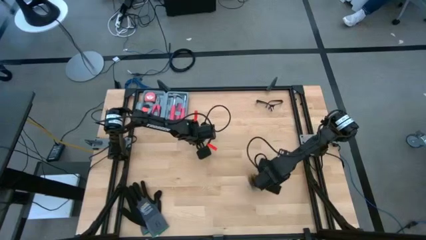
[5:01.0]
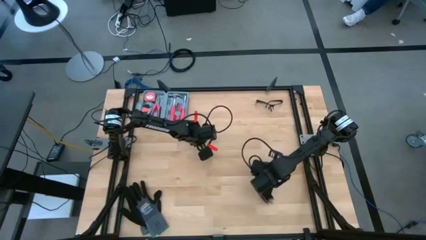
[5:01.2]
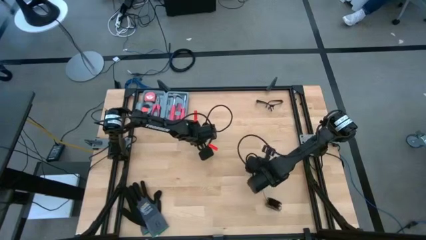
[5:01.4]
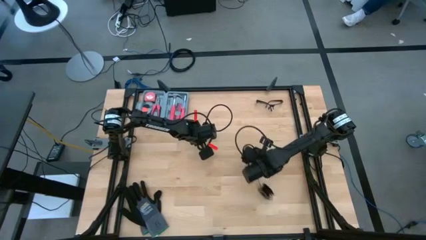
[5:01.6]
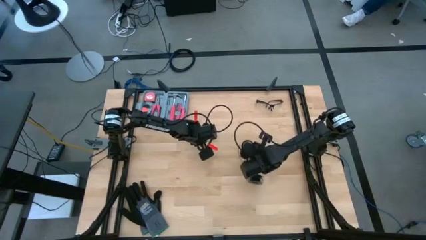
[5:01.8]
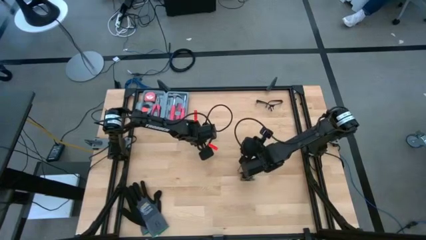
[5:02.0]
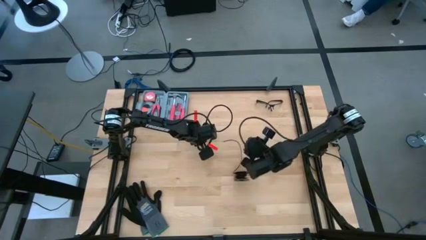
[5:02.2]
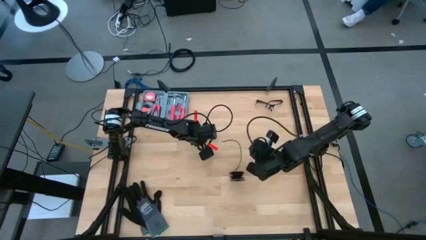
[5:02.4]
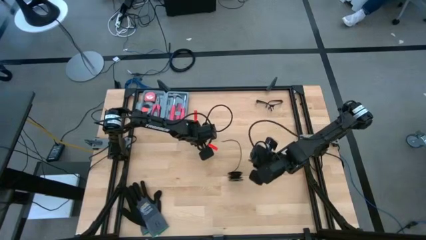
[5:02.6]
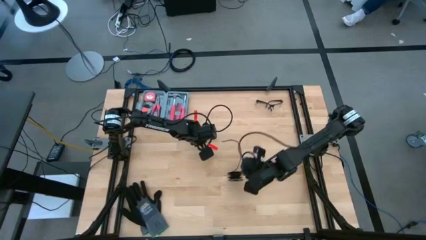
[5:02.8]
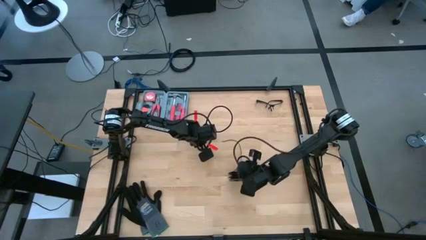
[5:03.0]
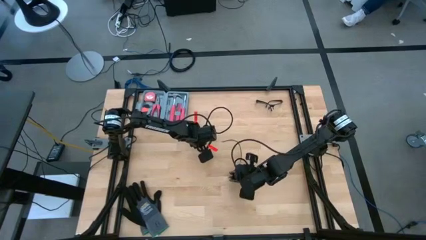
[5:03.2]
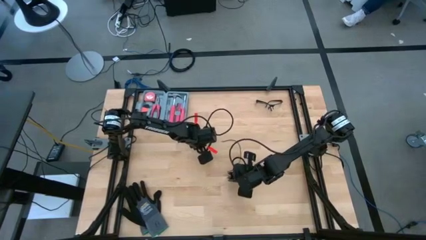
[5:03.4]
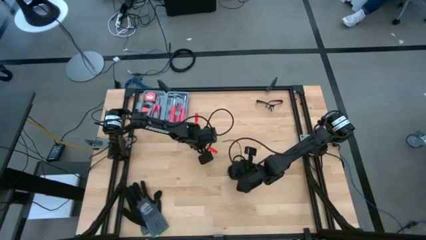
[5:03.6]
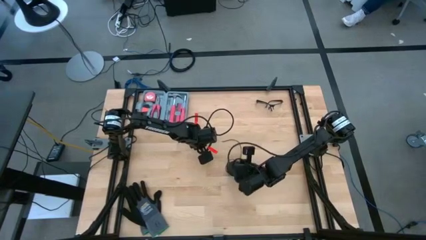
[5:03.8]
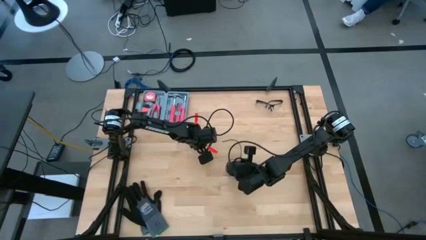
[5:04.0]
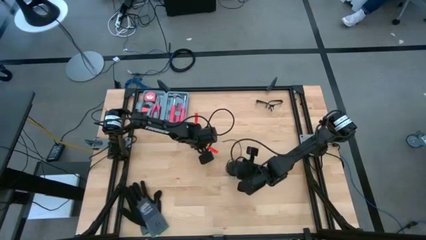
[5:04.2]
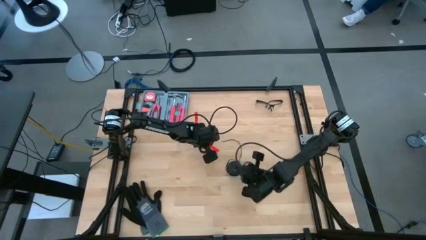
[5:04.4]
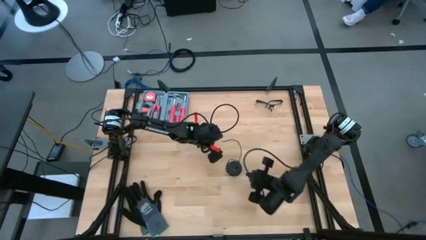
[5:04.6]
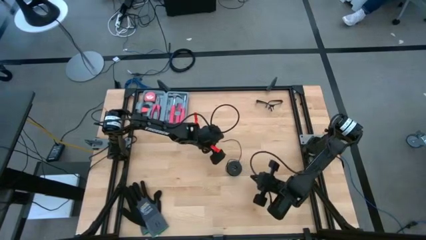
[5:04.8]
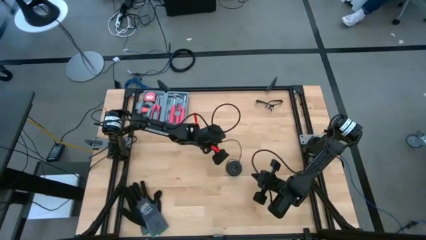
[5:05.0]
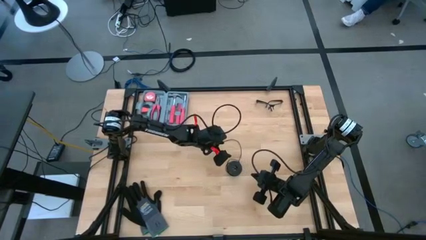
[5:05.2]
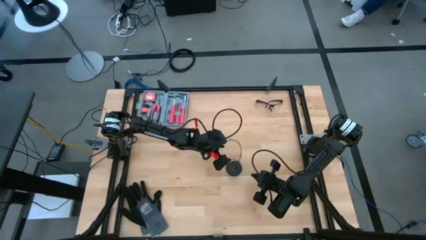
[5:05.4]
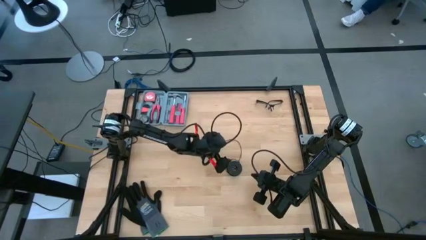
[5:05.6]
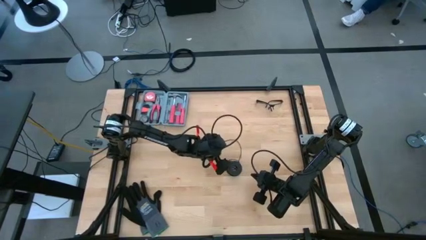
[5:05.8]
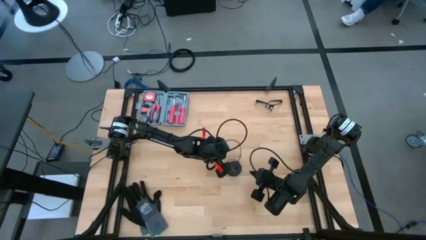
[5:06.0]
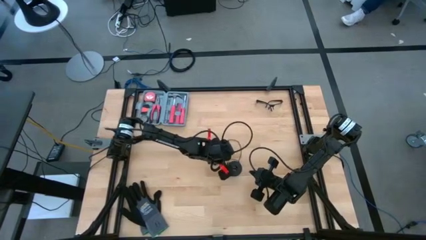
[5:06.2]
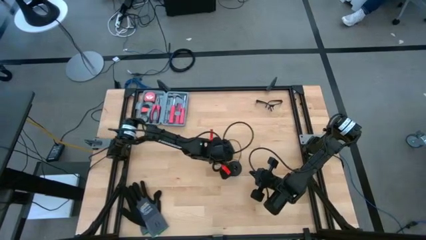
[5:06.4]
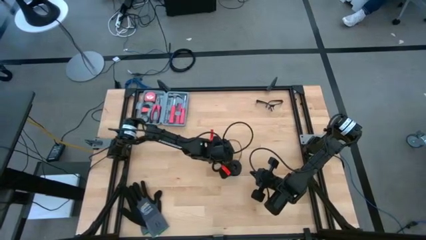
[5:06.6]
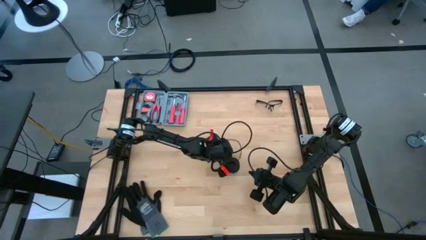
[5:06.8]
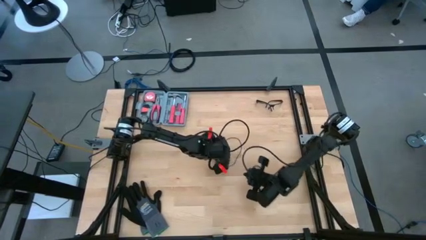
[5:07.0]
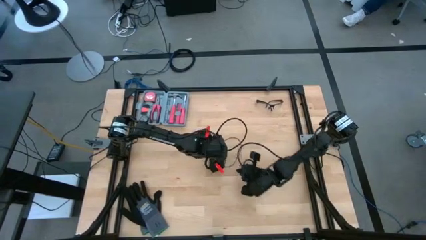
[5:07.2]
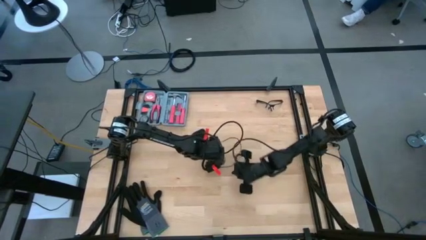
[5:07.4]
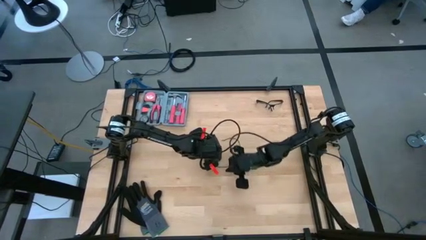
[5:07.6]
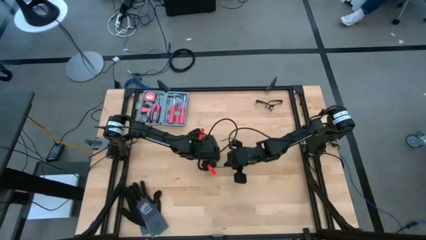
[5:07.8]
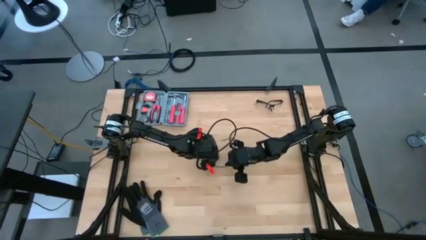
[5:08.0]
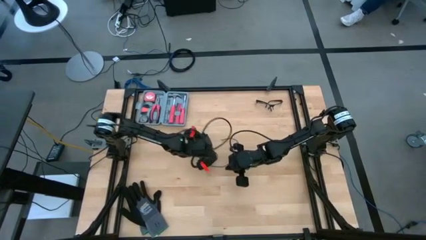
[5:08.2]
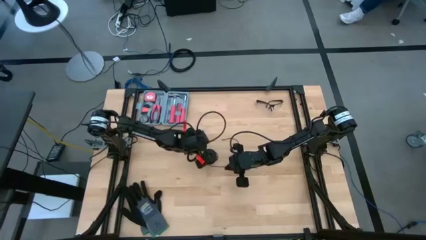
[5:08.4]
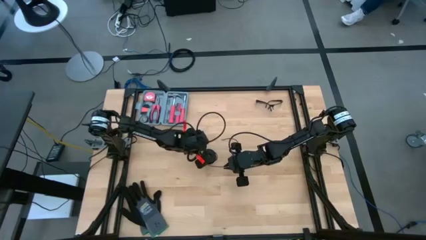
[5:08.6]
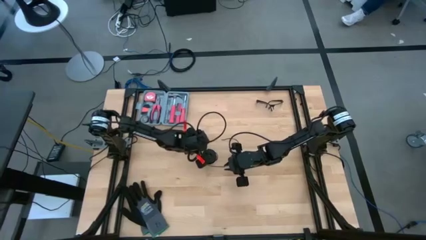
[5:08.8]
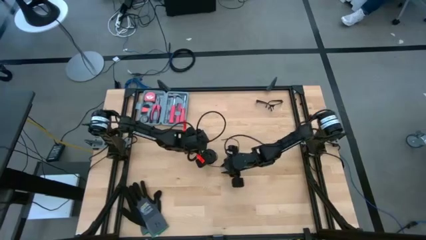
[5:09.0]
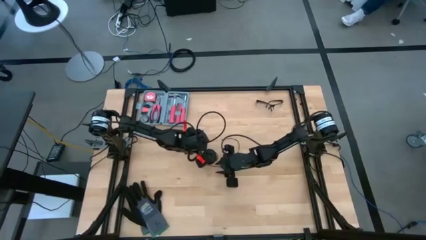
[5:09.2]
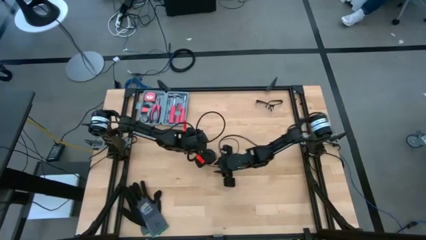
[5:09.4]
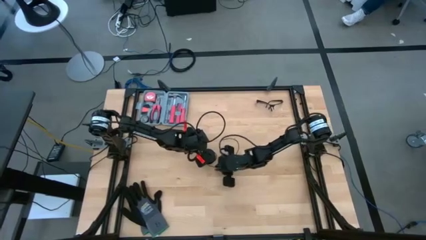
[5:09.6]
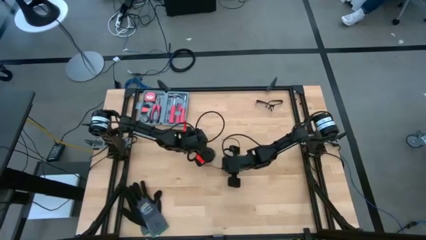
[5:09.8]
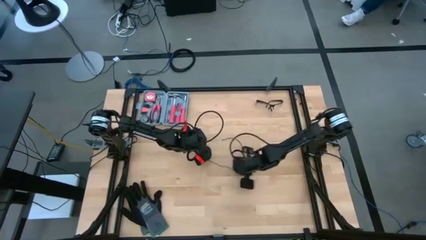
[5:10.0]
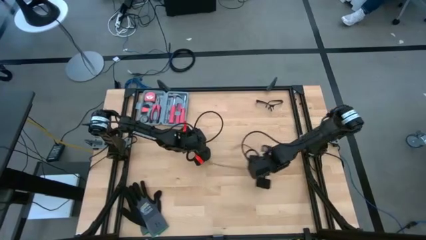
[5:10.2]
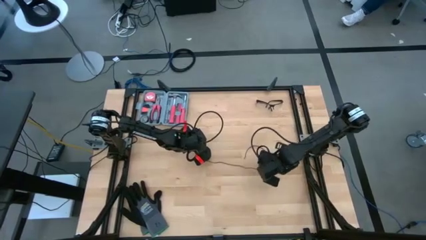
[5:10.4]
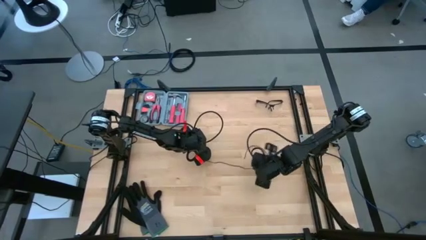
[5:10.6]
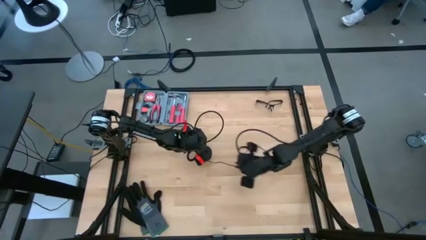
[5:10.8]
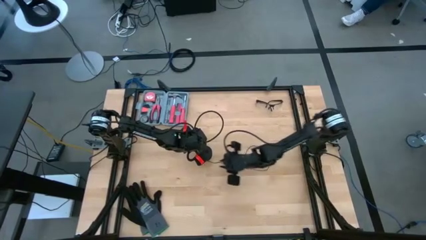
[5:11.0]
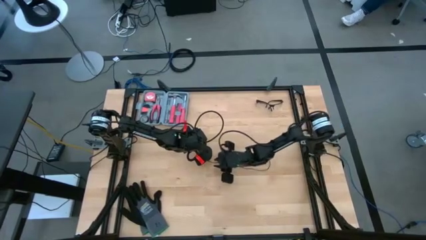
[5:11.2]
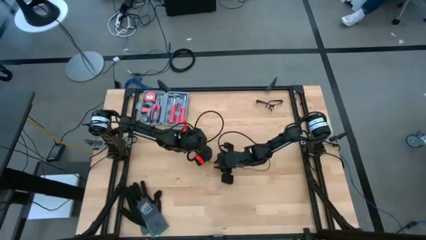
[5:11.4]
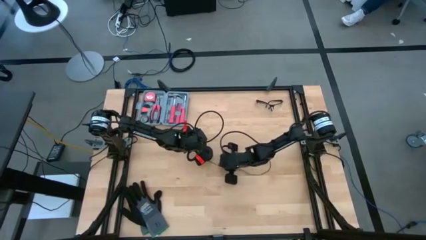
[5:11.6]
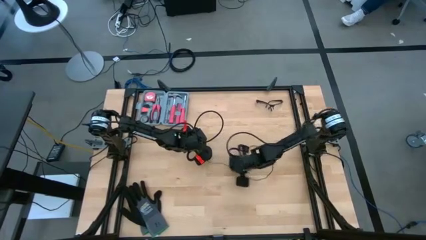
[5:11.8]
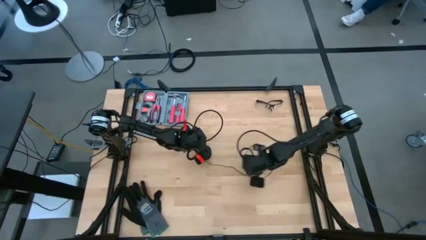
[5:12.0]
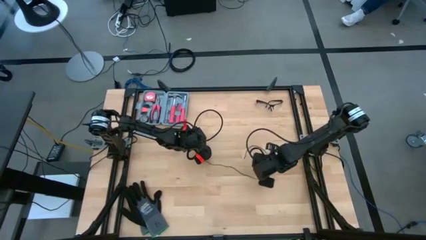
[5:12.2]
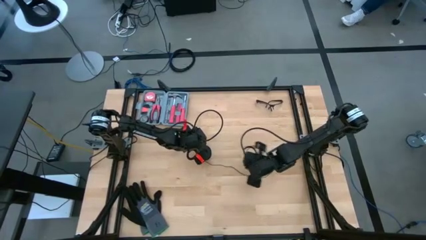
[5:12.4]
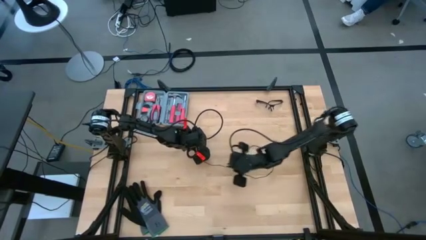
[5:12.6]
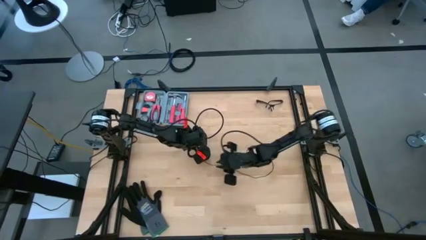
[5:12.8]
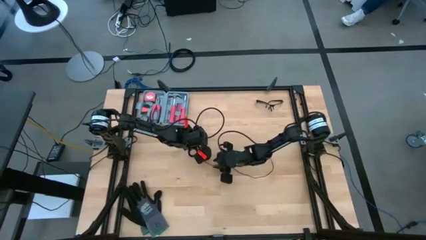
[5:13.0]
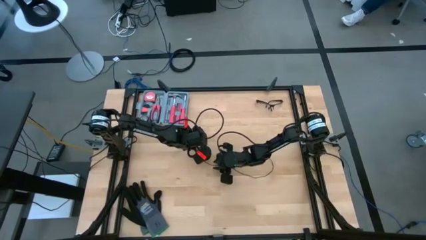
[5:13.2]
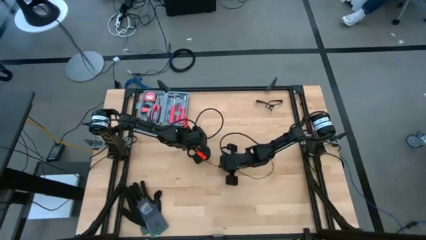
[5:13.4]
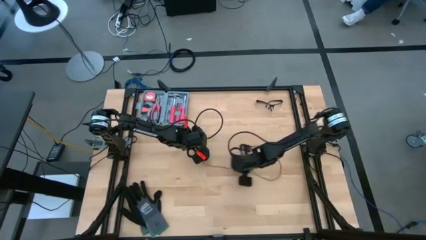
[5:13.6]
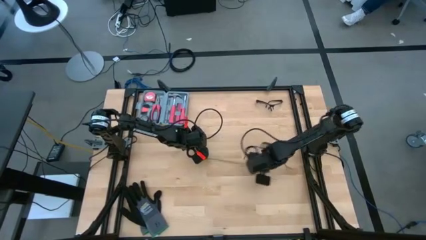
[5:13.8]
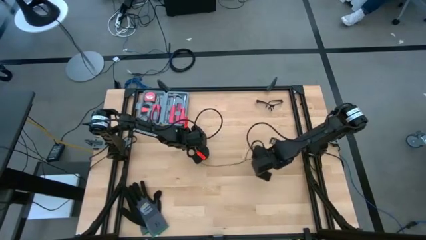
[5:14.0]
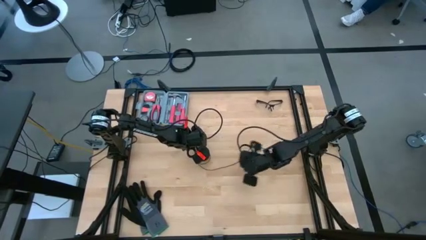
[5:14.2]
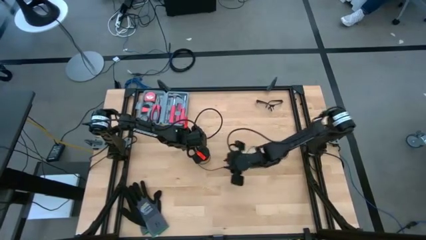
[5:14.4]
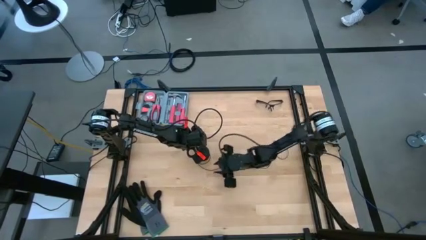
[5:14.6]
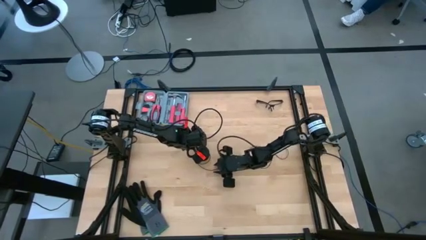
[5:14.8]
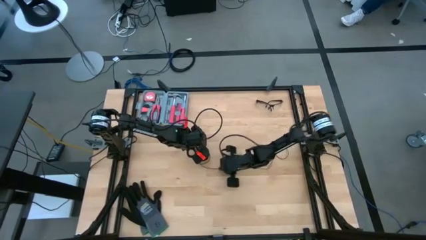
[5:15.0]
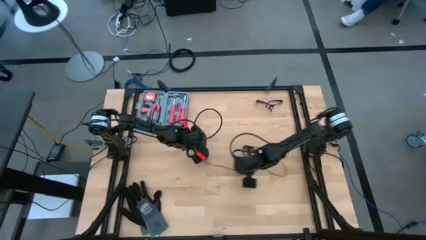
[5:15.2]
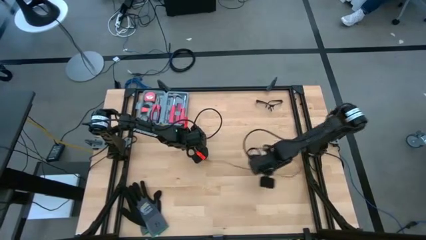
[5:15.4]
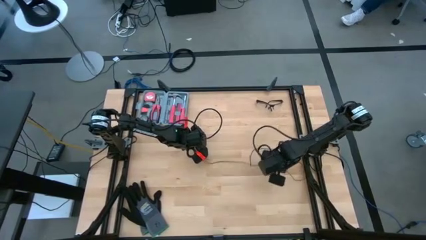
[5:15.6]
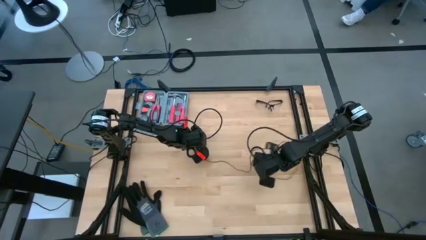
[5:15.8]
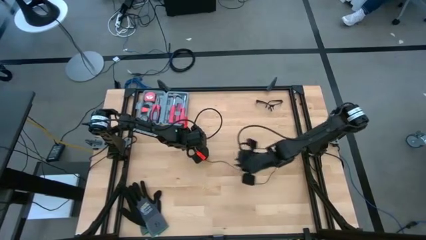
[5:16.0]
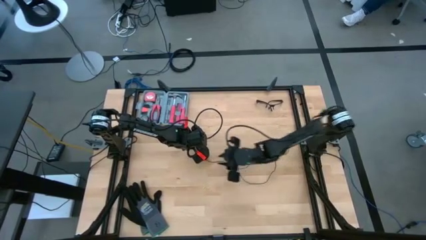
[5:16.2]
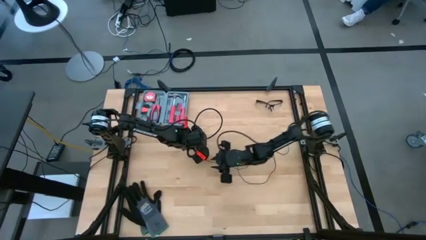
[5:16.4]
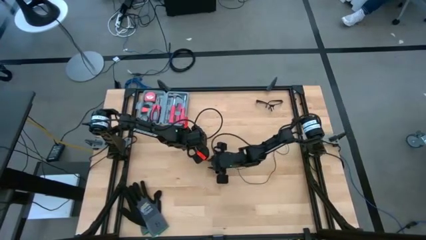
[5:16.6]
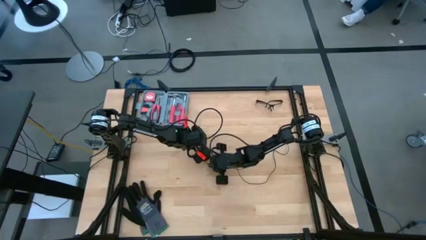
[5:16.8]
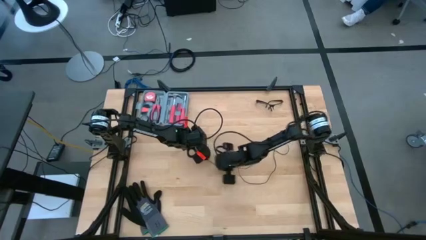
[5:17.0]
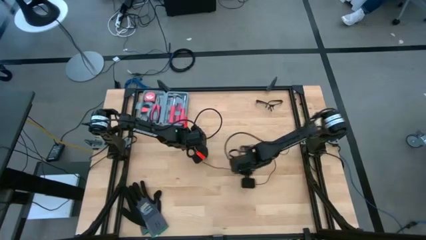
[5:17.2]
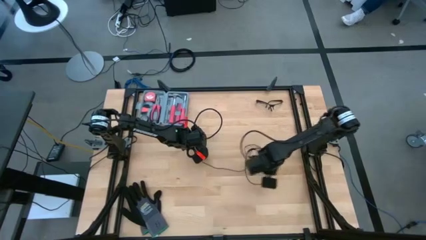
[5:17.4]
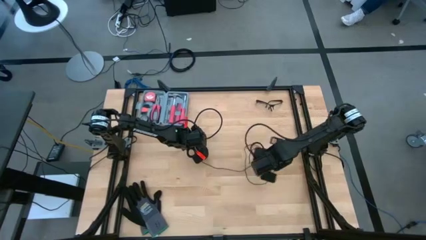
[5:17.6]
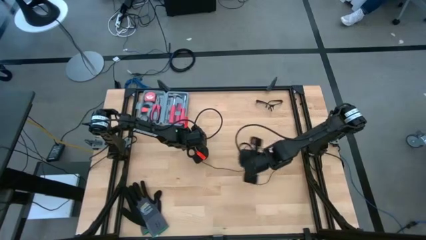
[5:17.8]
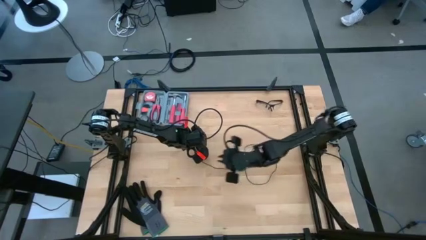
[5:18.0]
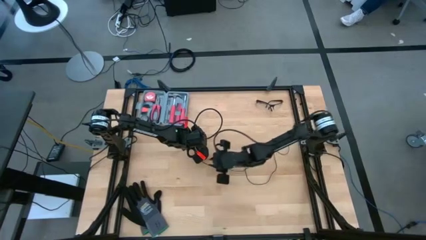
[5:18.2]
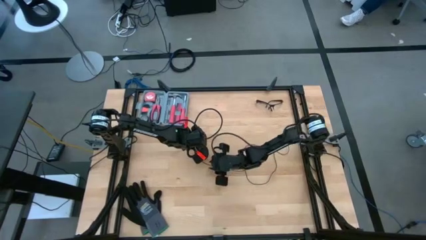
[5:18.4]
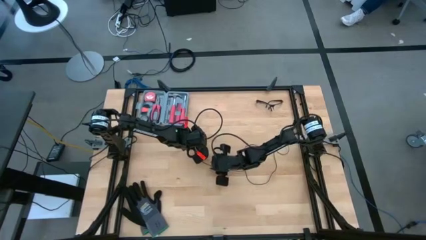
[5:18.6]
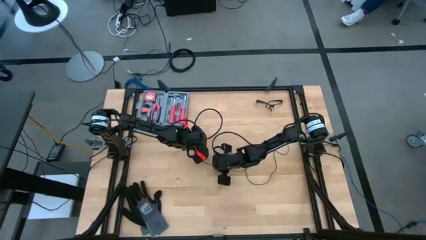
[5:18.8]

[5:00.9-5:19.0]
Task: Coil cords
Uncoil the black wire from the black spool
